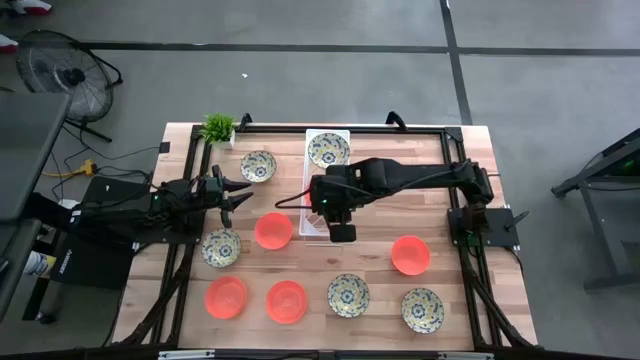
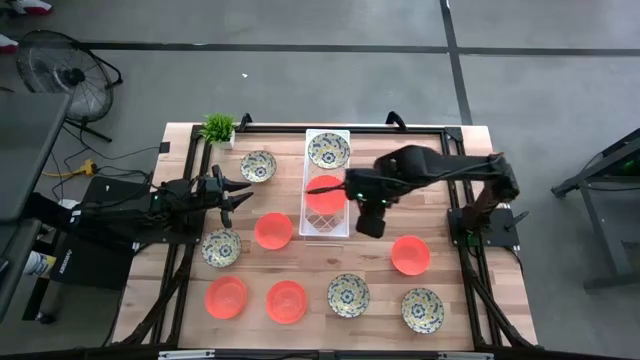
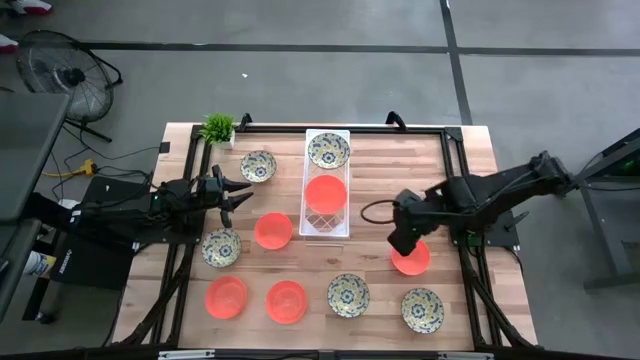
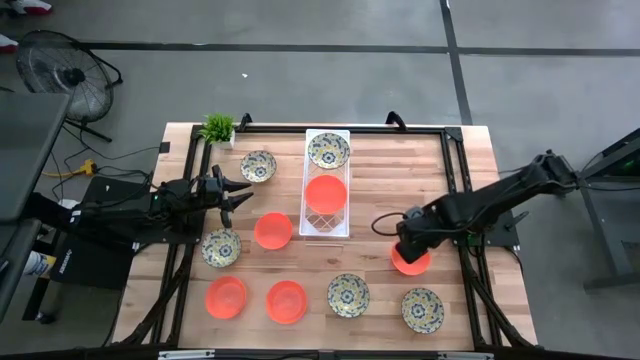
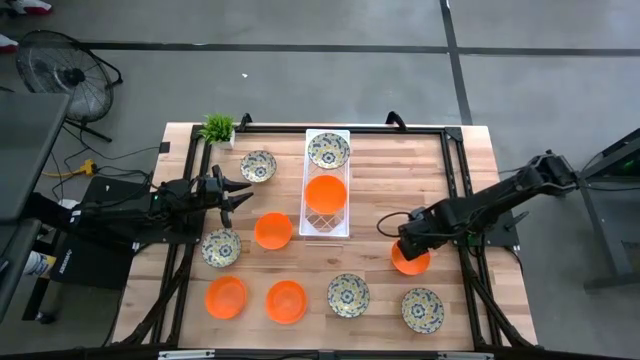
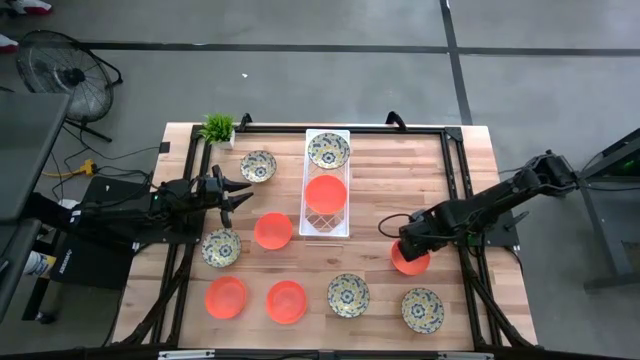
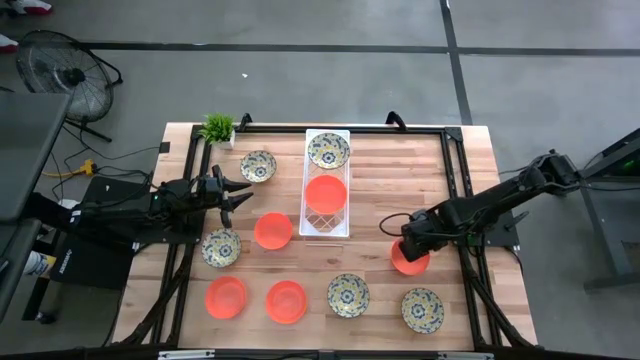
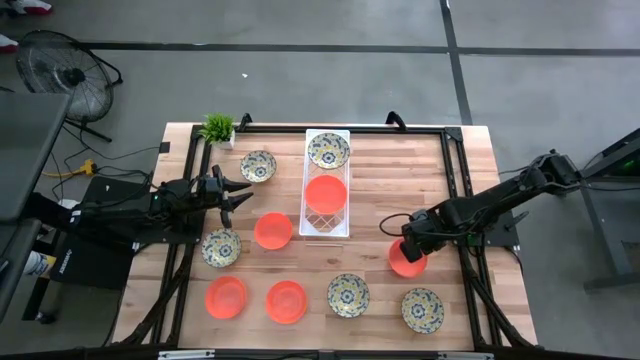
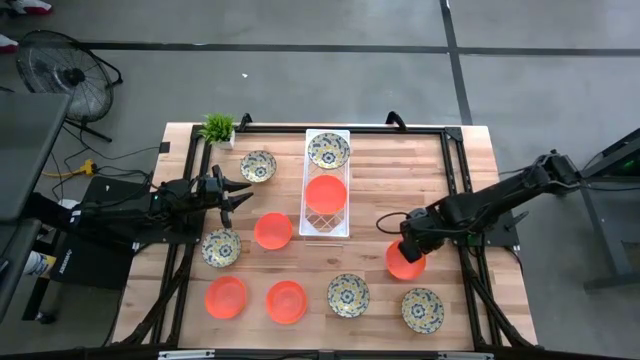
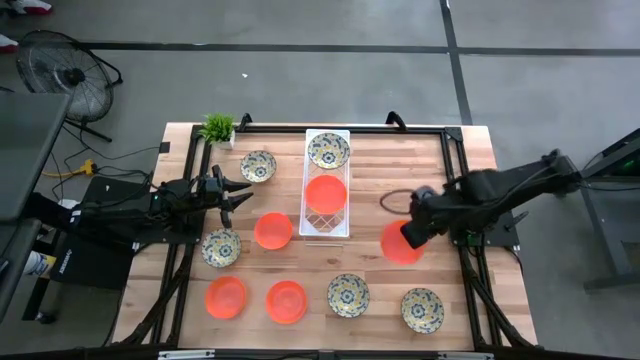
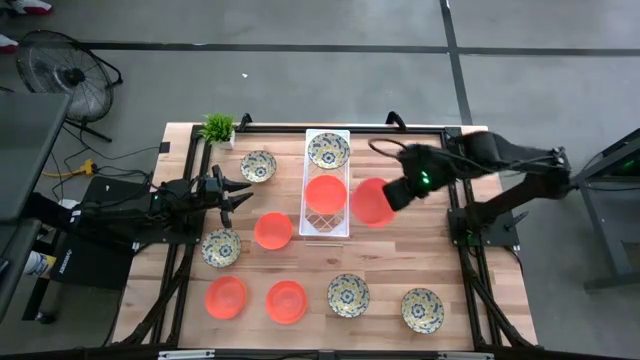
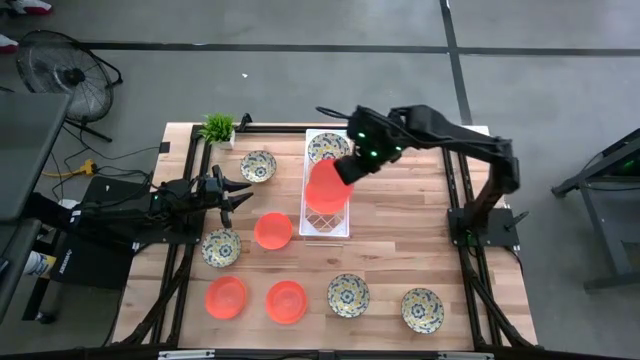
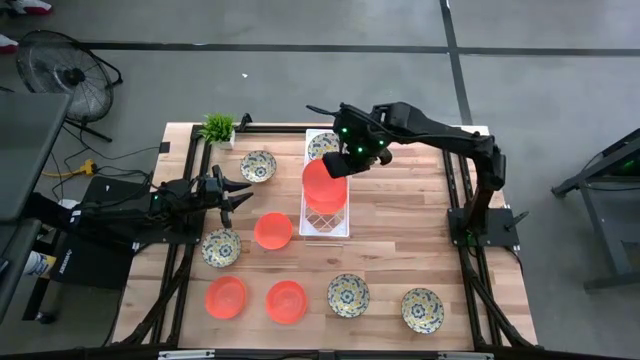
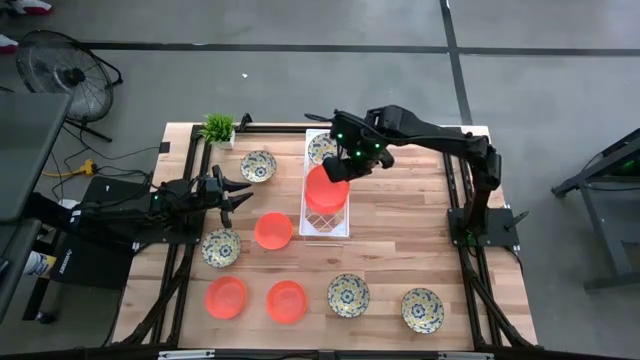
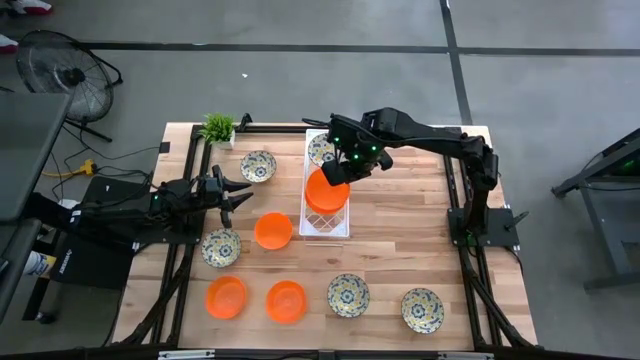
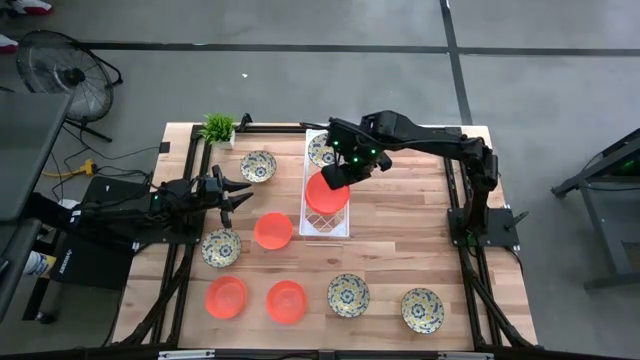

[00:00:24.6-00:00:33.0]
Task: Pick & Place Mini bowls
Stack the orange bowl on top of the orange bowl on the shelf

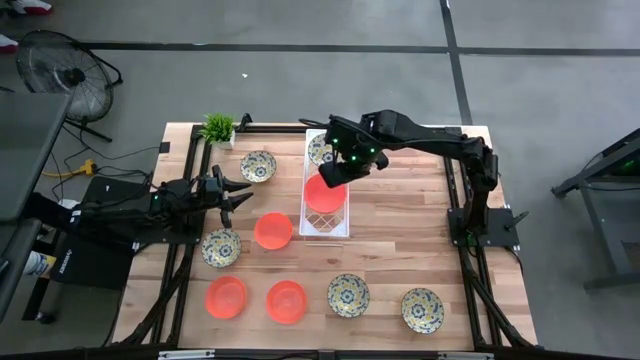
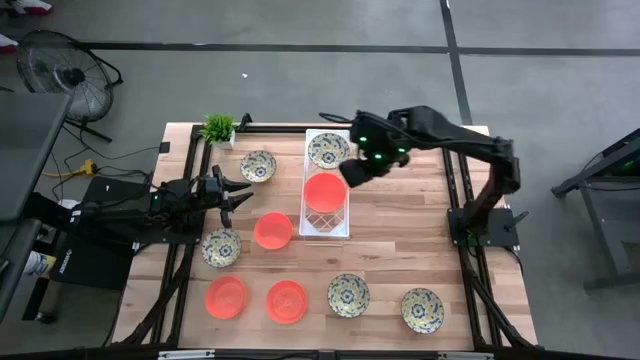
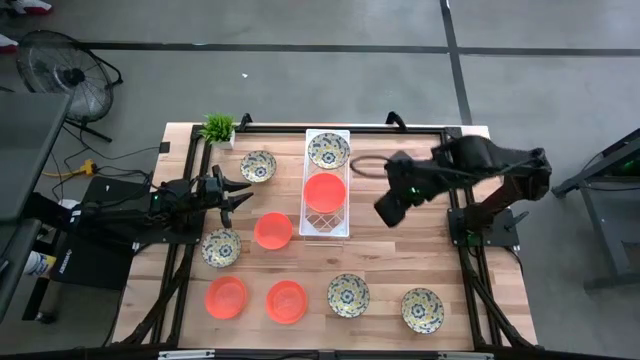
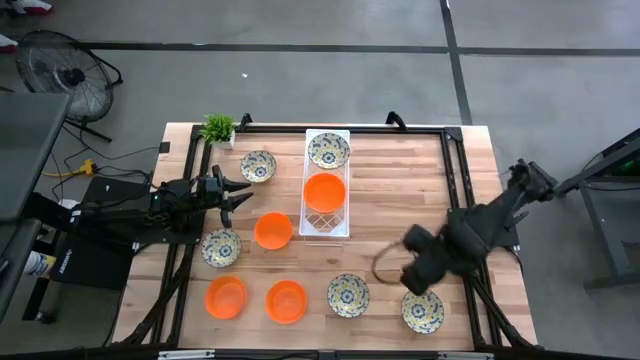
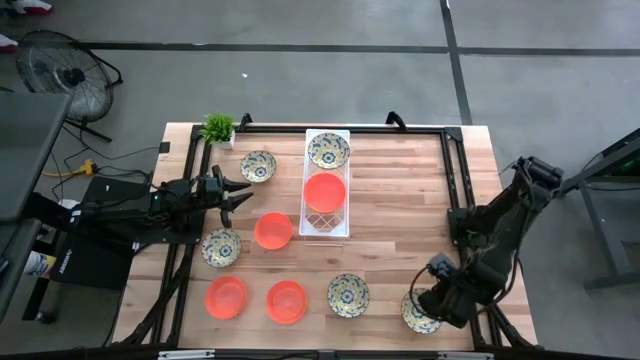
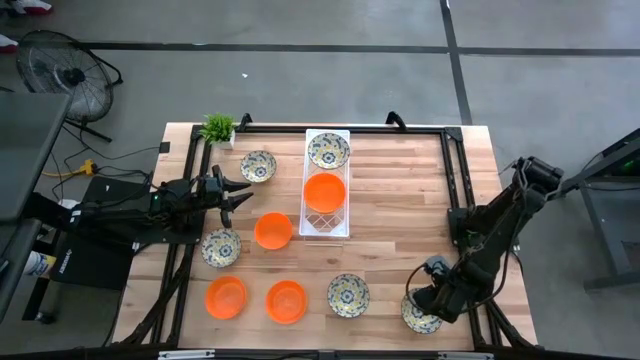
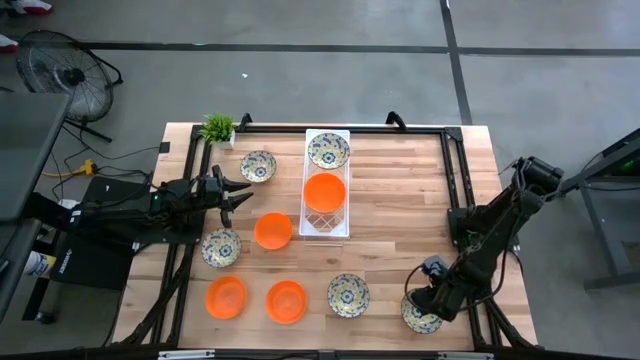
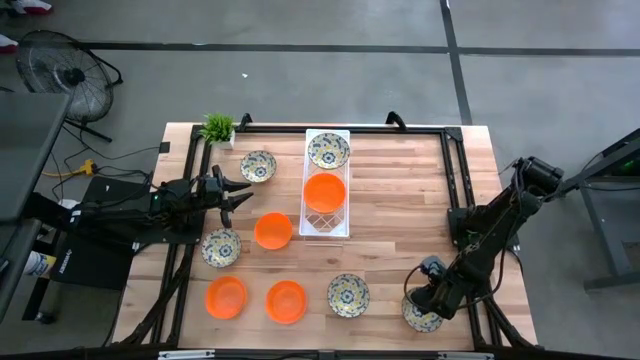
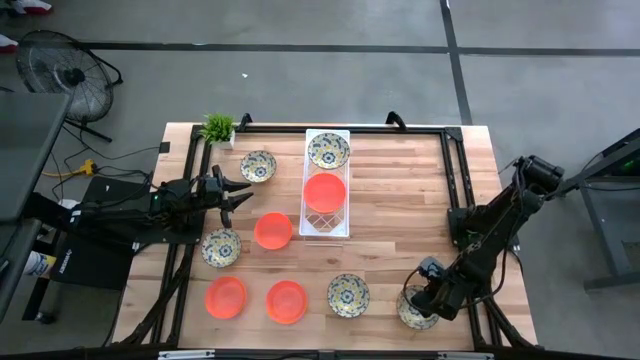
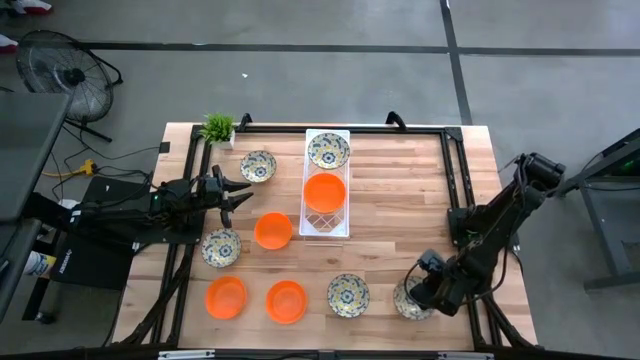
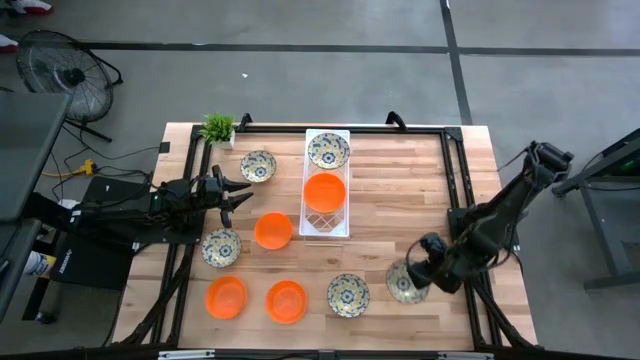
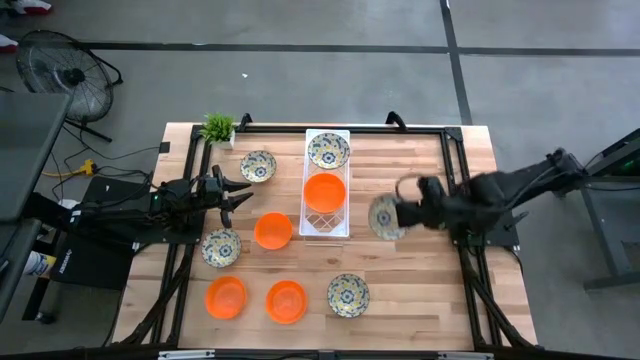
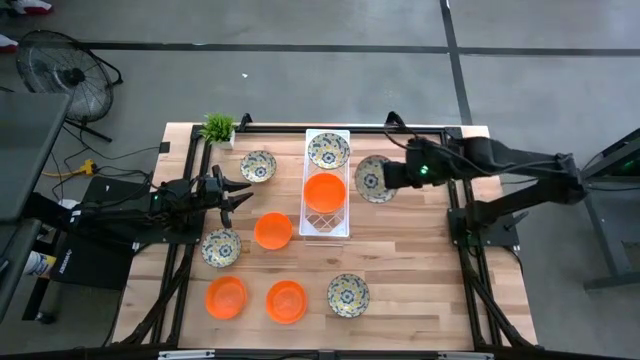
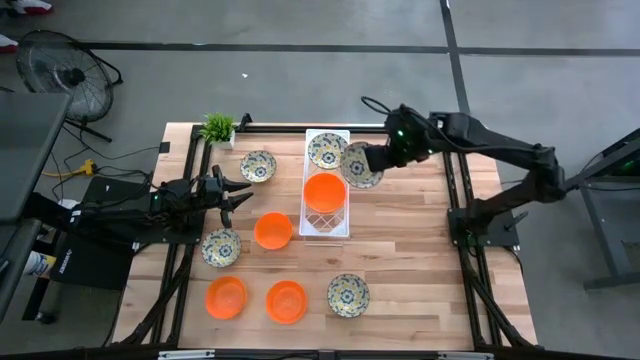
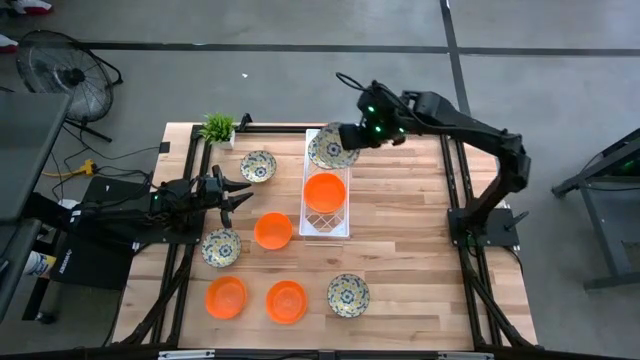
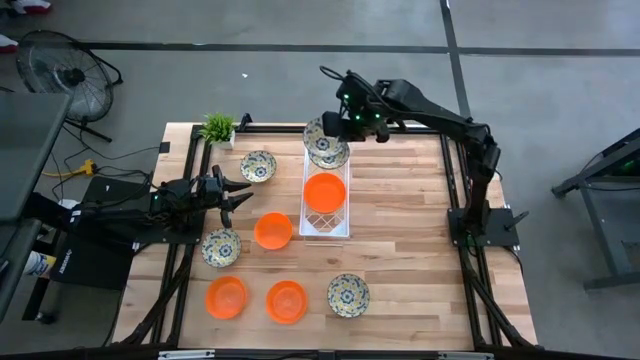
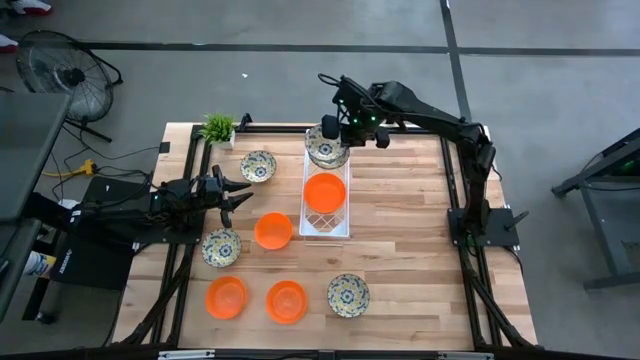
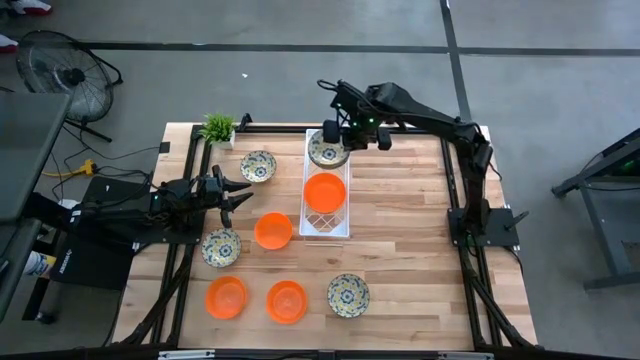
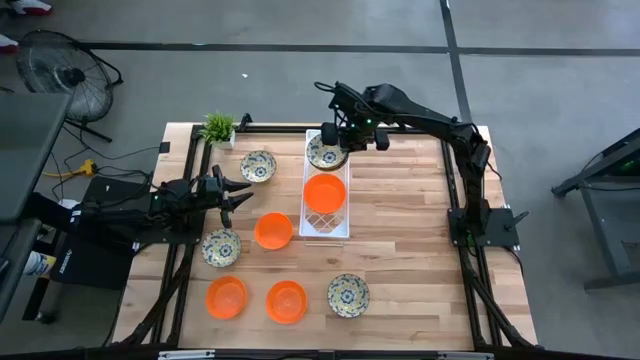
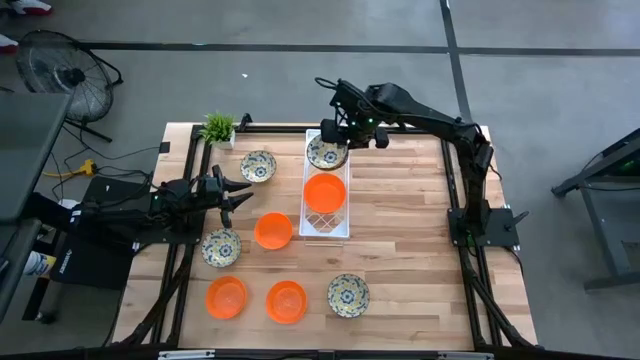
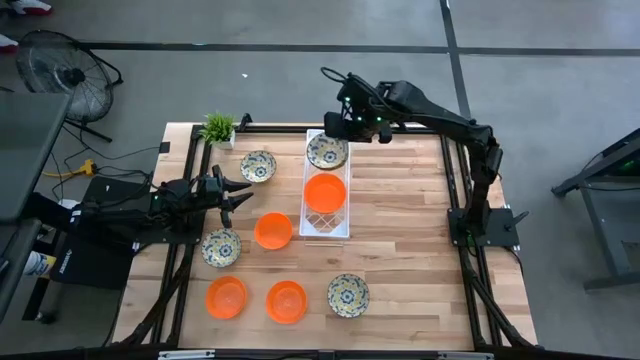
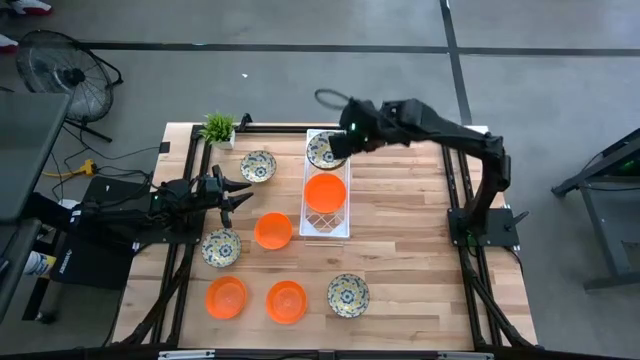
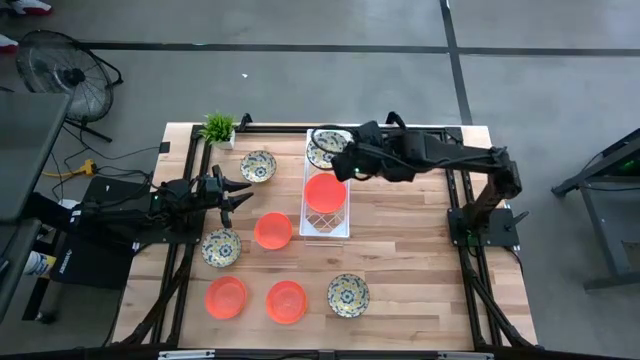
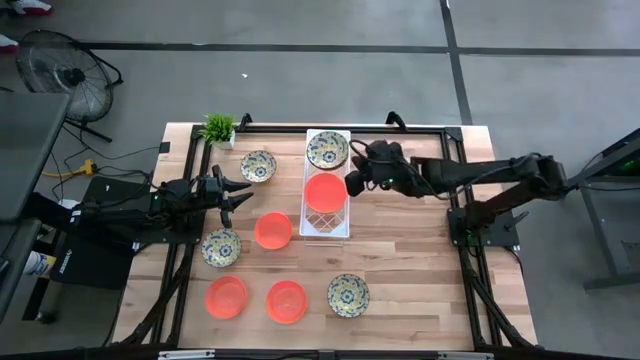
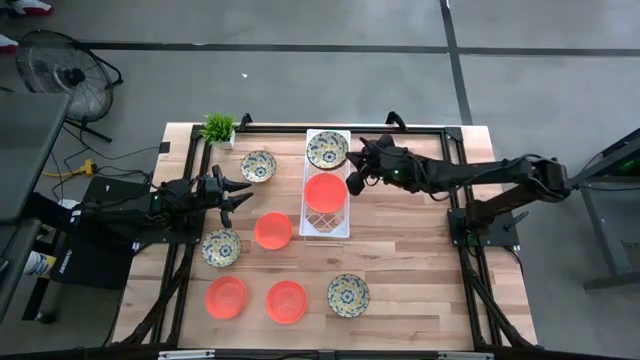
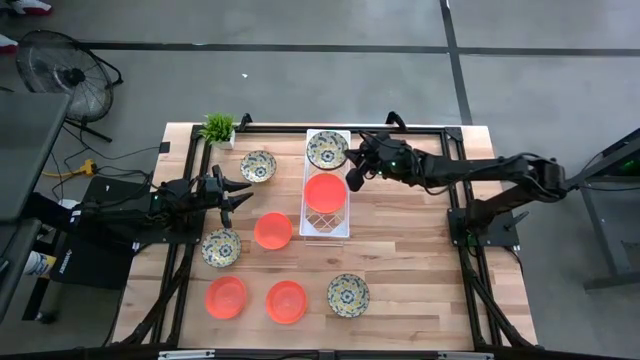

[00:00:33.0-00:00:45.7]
Stack the yellow bowl on top of the yellow bowl on the shelf

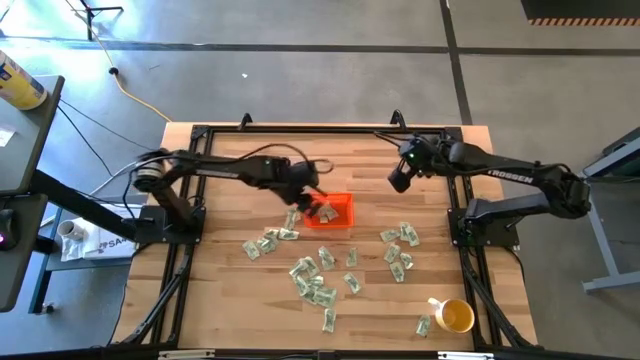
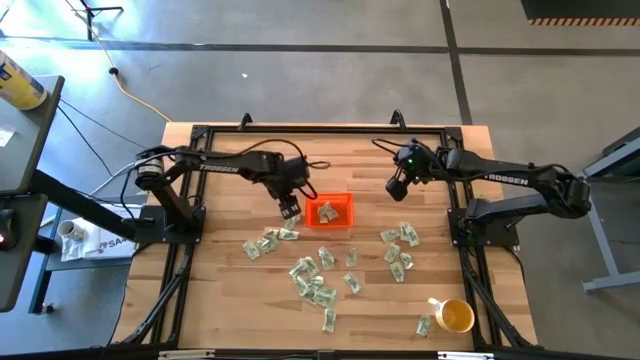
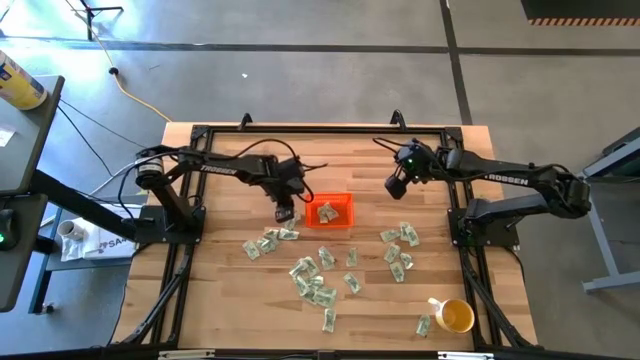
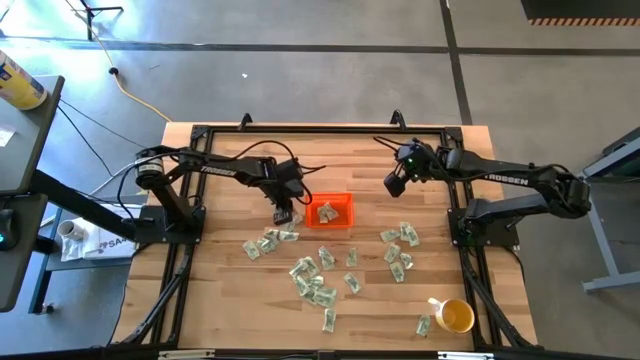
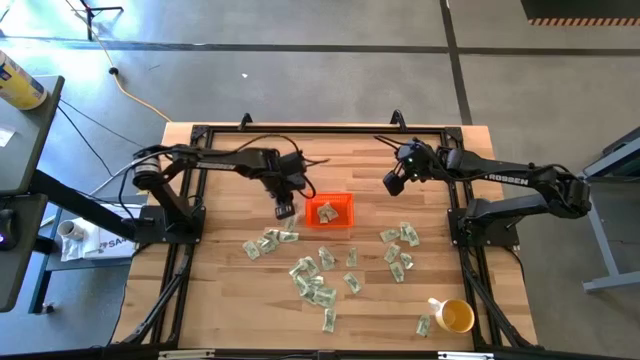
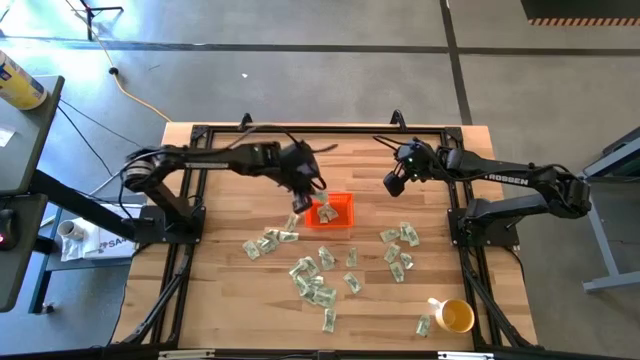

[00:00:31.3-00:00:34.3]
Task: Pick and place Stevia / Truvia into bins
Put the stevia packet into the orange bin
